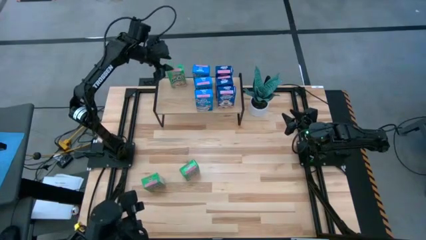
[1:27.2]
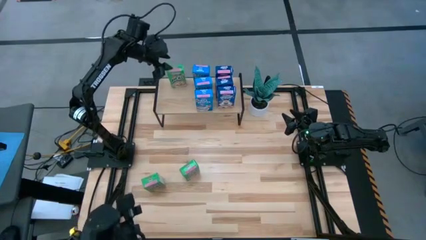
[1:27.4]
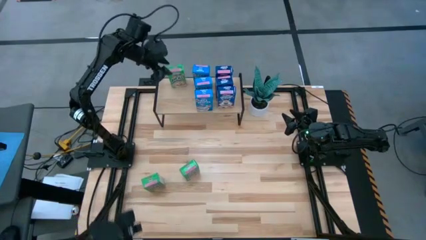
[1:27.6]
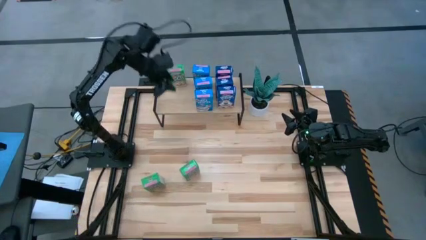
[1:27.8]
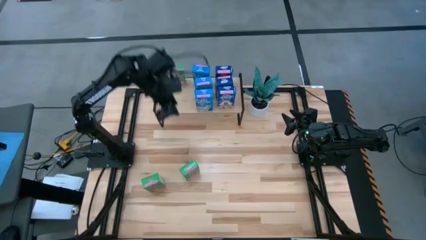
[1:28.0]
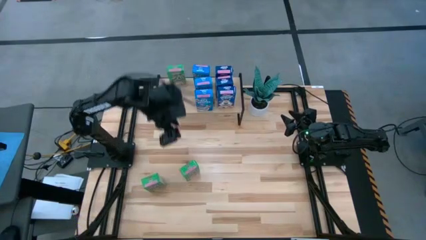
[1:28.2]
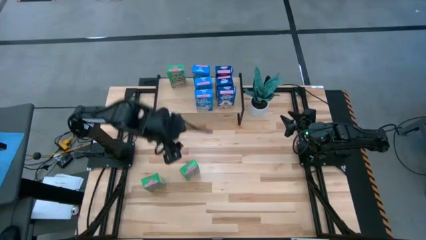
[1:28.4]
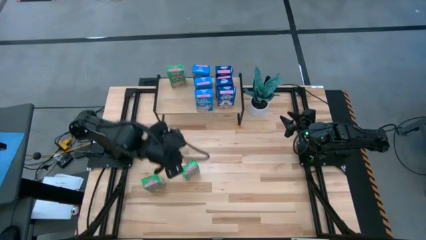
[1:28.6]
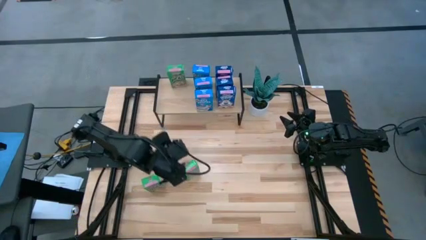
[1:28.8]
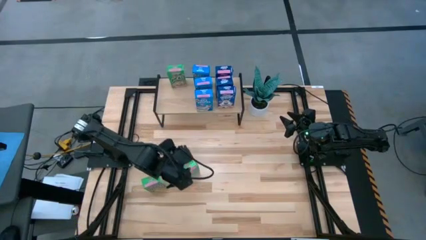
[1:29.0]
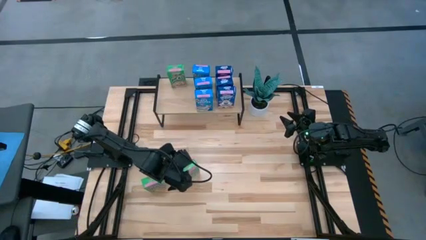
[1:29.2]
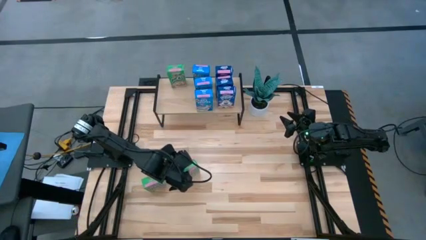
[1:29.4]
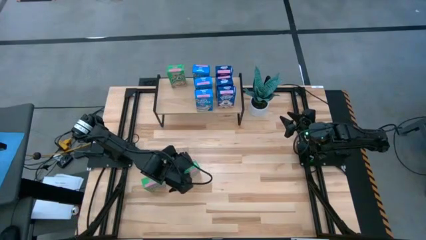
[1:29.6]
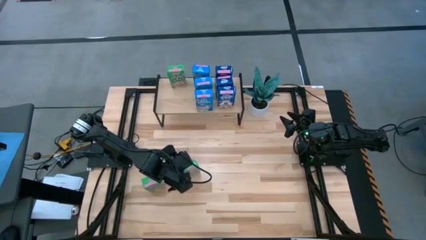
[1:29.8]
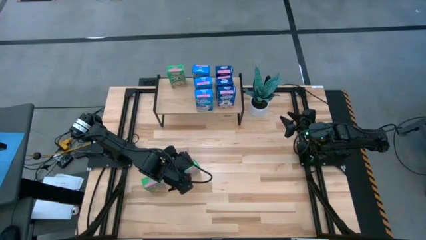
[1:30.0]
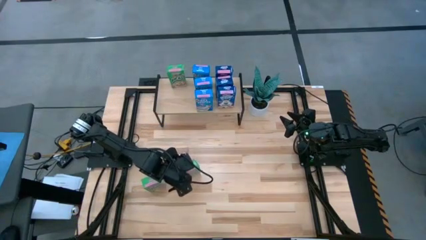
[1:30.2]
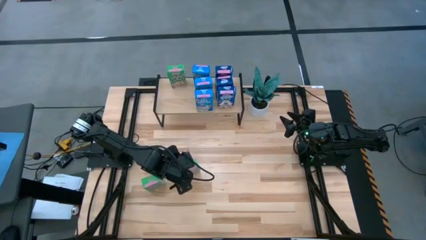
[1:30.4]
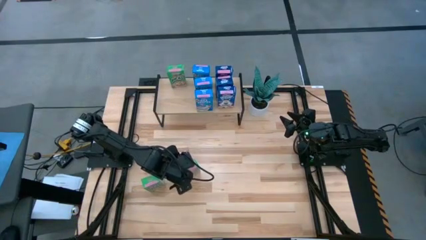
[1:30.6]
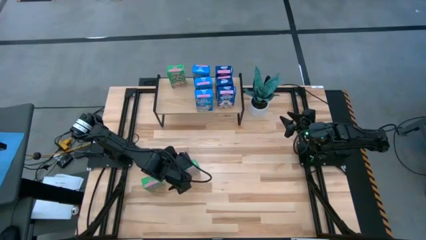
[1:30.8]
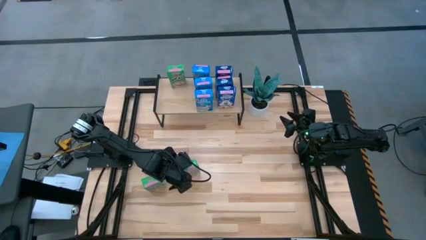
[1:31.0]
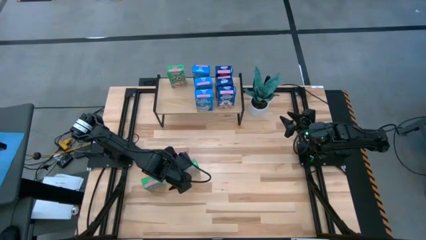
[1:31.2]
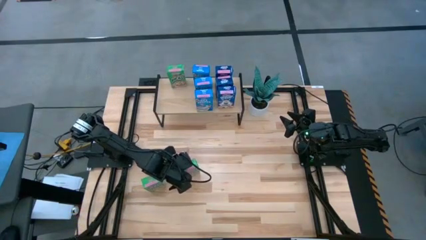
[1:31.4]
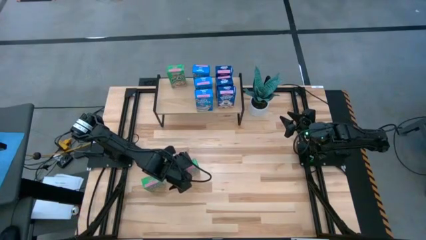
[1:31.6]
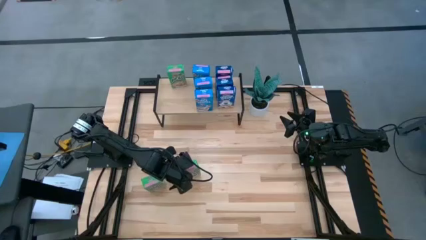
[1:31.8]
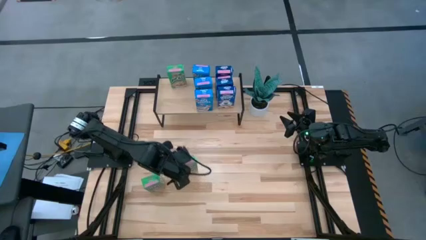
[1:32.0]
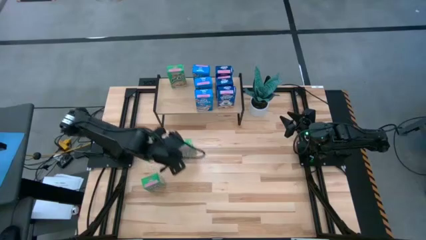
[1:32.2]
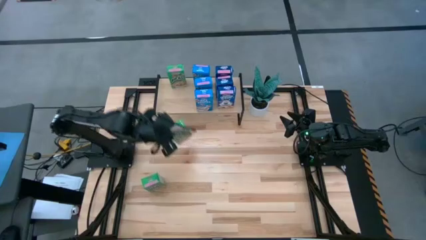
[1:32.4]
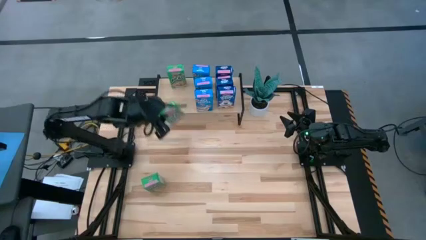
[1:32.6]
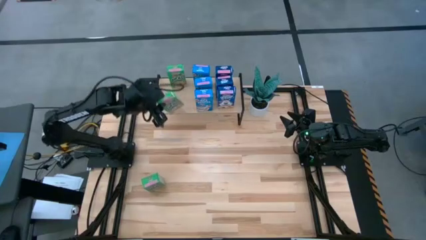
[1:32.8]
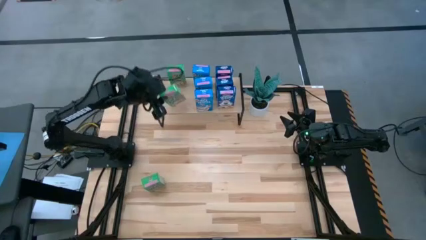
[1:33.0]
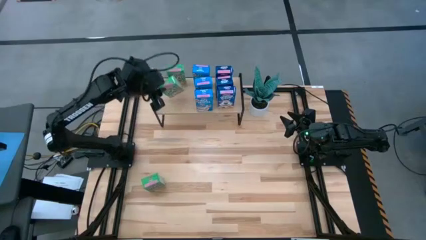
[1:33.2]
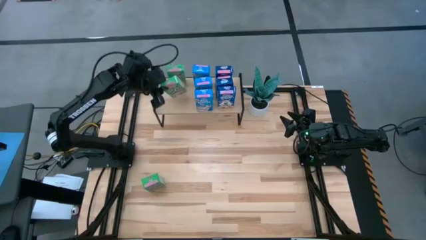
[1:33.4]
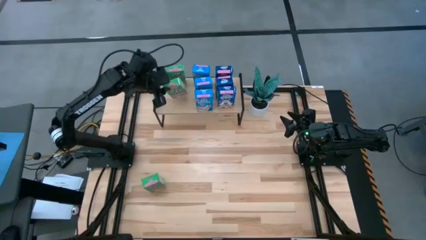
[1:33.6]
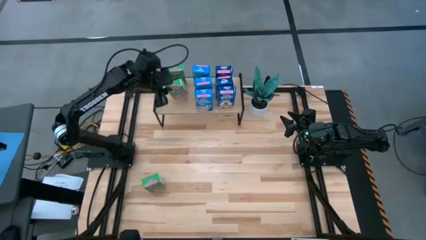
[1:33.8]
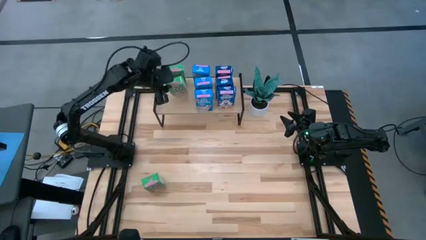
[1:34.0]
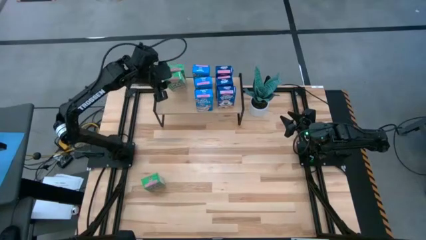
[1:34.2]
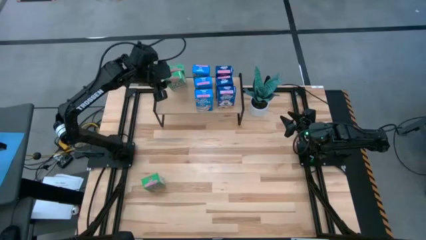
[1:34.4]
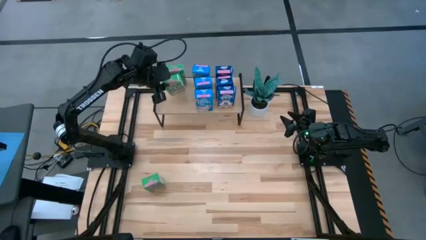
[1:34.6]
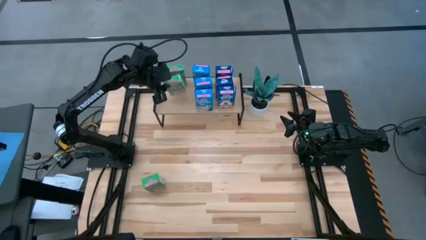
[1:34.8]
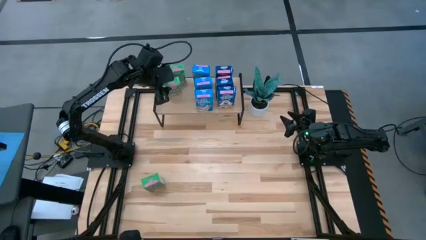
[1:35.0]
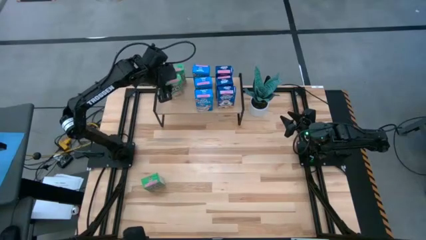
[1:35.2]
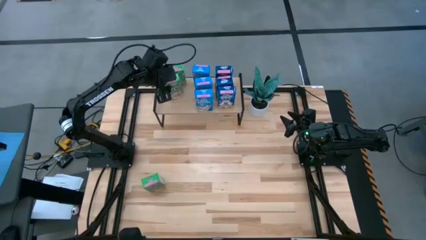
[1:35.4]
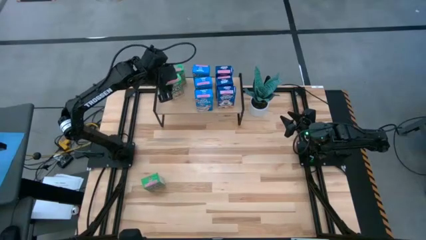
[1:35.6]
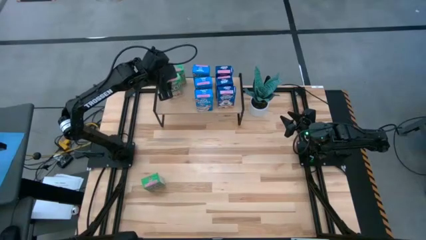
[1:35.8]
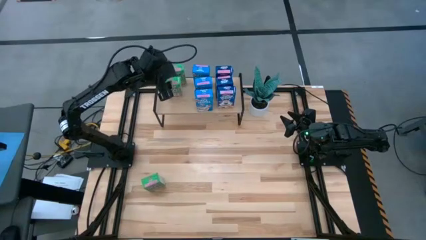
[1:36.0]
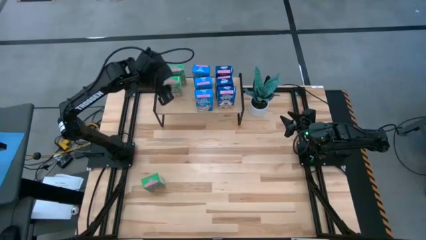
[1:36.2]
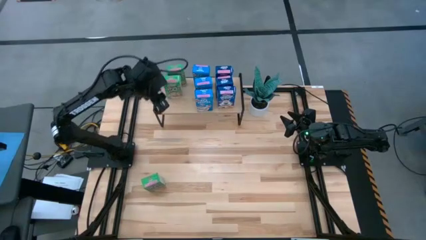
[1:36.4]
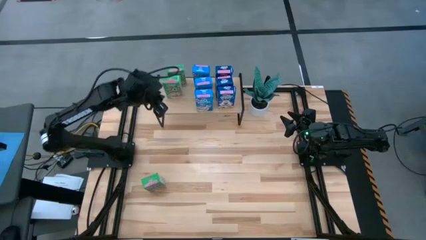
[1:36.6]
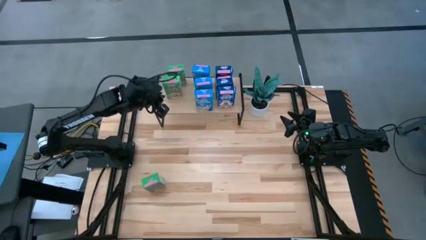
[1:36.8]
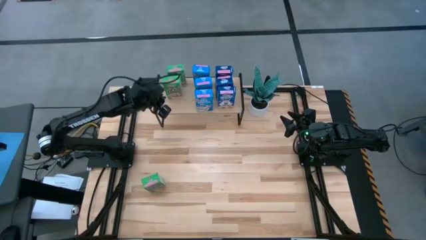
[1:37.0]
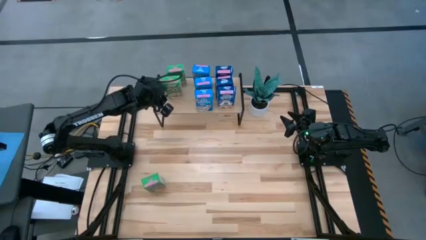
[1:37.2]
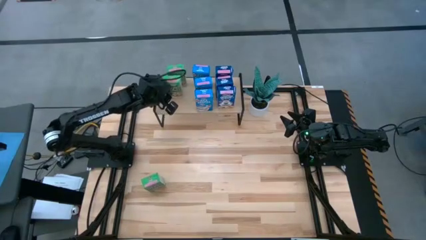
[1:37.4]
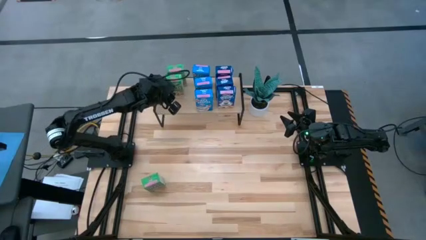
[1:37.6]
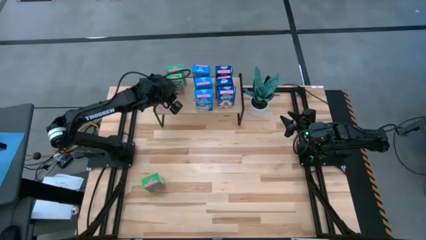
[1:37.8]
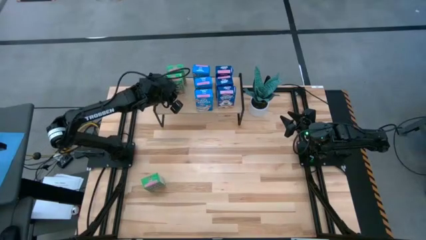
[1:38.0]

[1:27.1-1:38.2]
Task: Stack cereal on shelf
Put the right green cereal box on the shelf aligned with the other green cereal box

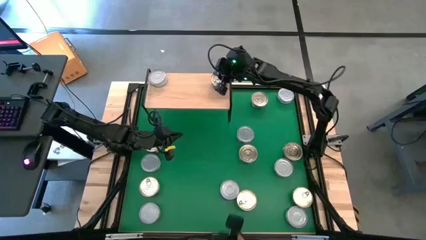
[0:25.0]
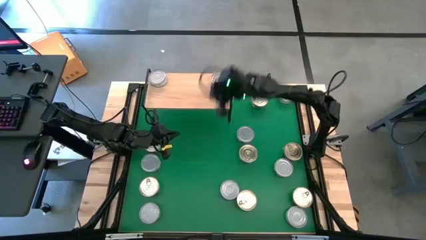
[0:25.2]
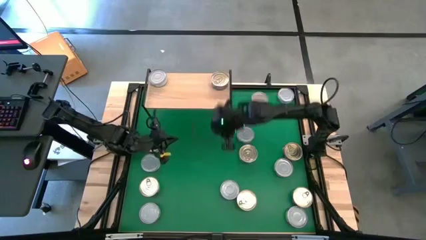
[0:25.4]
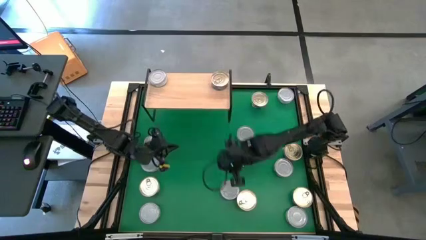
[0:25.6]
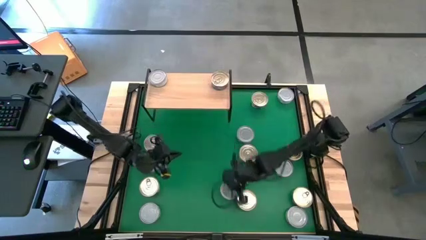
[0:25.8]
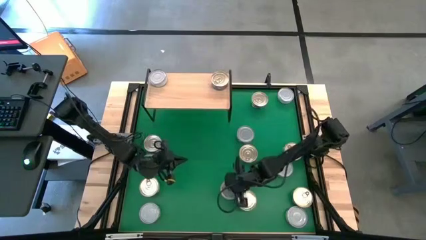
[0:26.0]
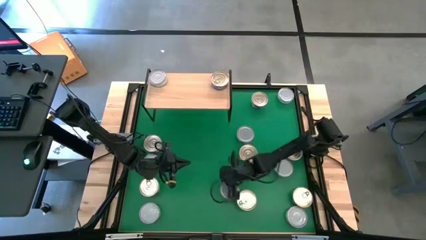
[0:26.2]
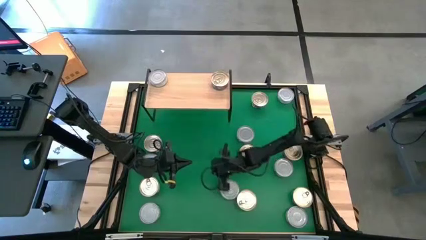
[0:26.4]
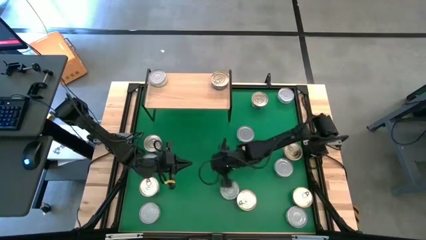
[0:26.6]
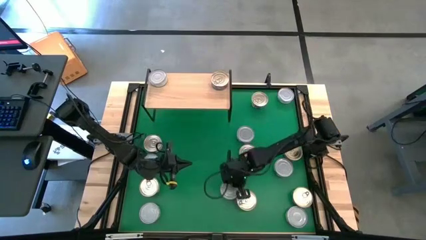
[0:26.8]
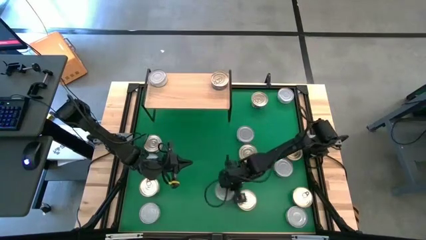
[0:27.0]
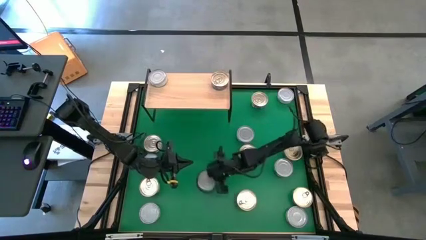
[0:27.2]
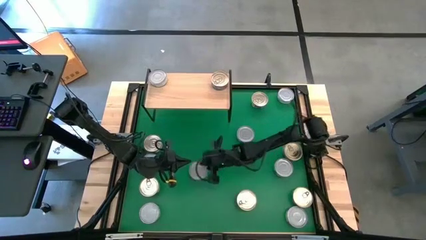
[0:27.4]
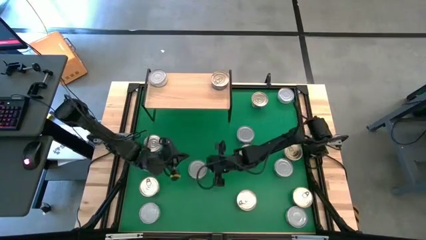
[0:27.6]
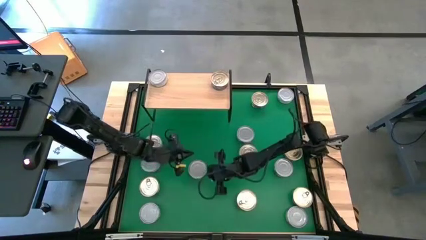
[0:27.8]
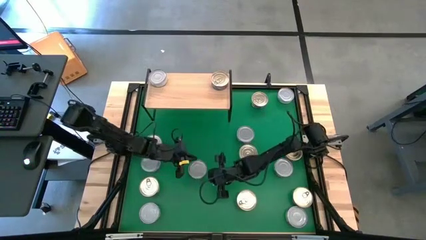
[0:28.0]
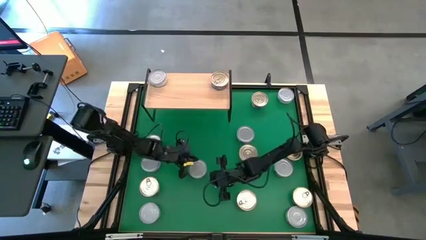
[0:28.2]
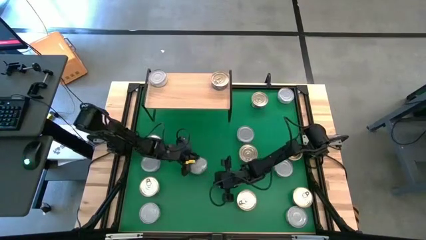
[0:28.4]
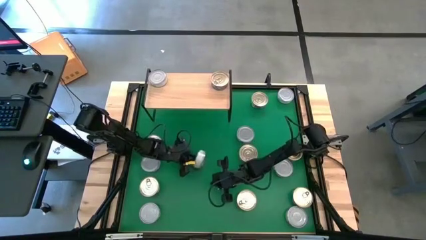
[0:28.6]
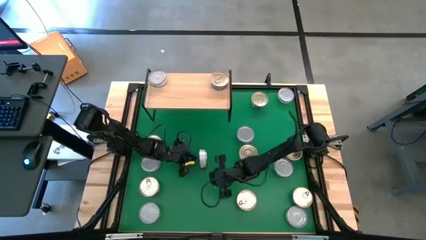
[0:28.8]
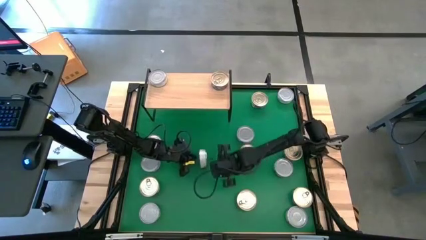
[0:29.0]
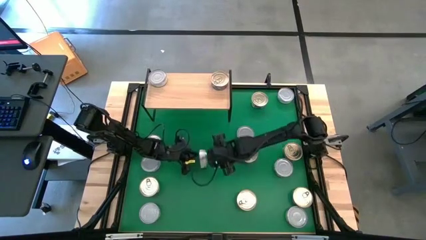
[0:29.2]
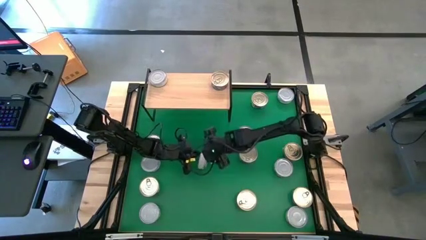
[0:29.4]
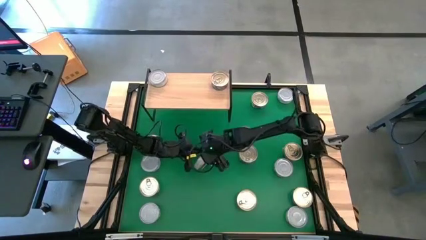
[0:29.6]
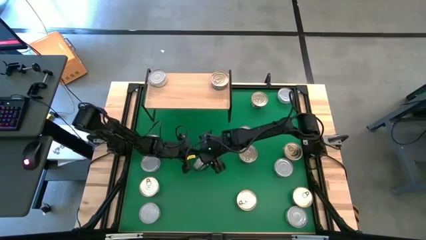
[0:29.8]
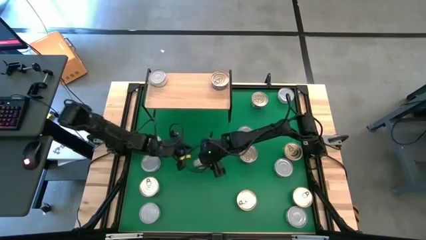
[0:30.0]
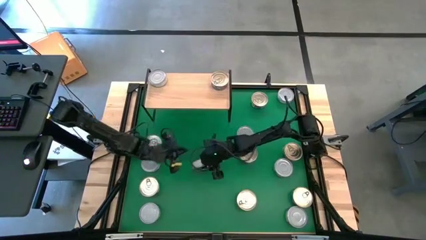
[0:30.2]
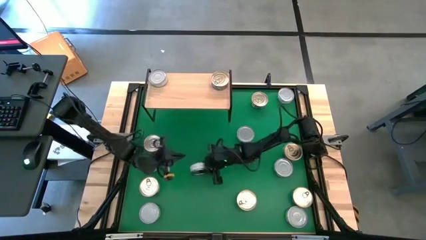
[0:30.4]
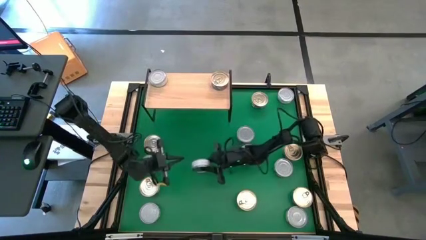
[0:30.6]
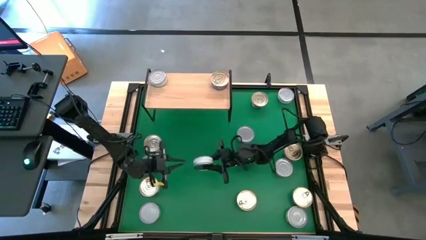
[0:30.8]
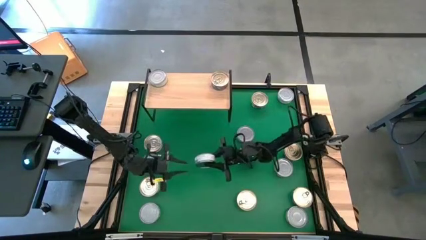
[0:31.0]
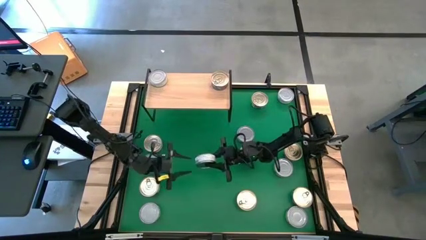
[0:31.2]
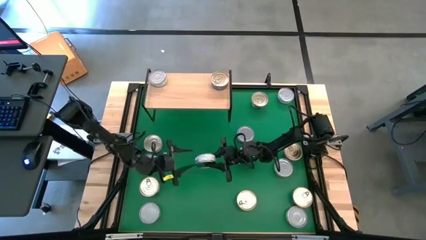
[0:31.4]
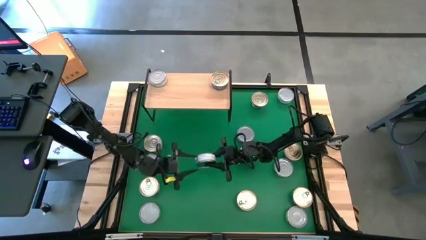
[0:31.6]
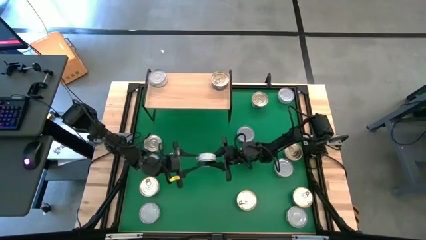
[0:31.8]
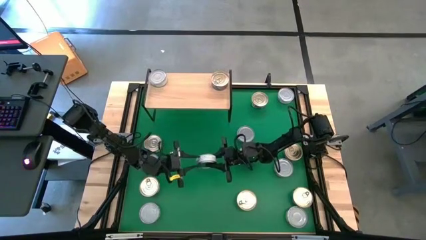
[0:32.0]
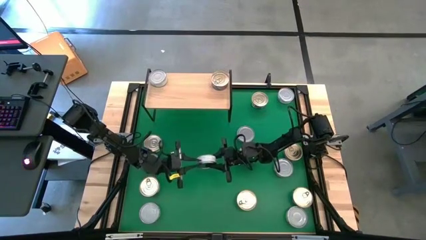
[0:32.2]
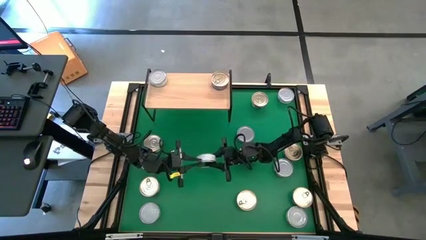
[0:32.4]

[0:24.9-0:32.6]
Task: Stack canned seafood by type on shelf
Put the green tuna can on the shelf
